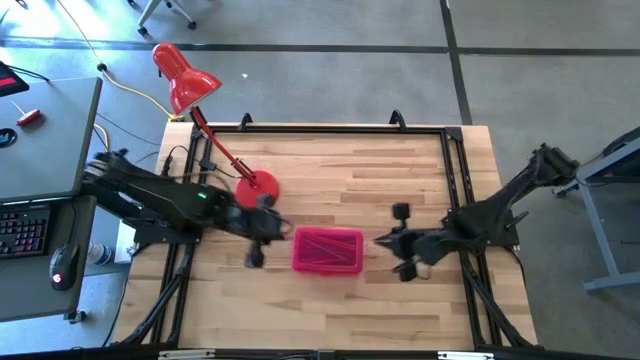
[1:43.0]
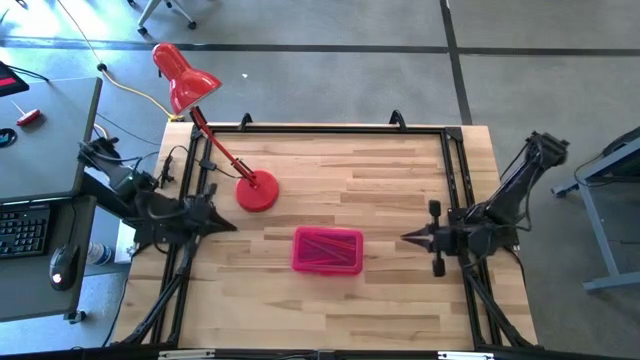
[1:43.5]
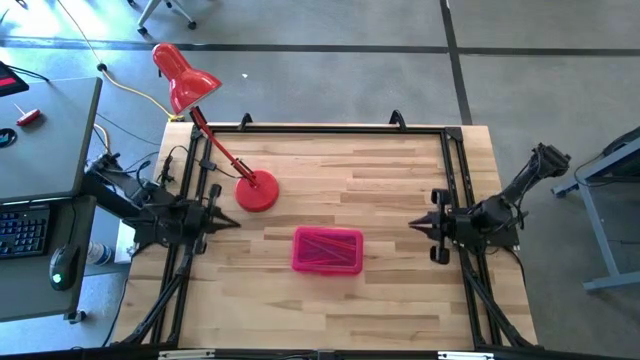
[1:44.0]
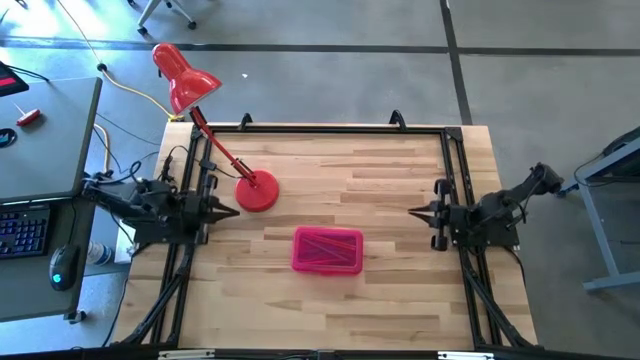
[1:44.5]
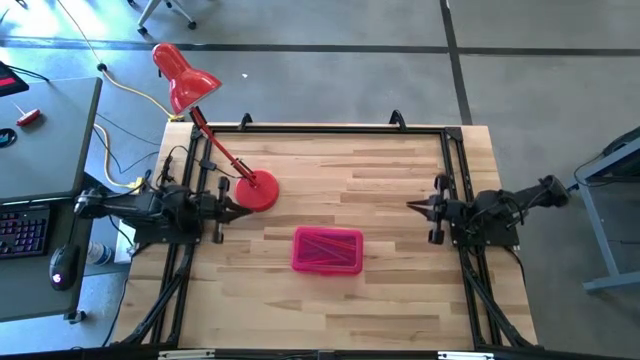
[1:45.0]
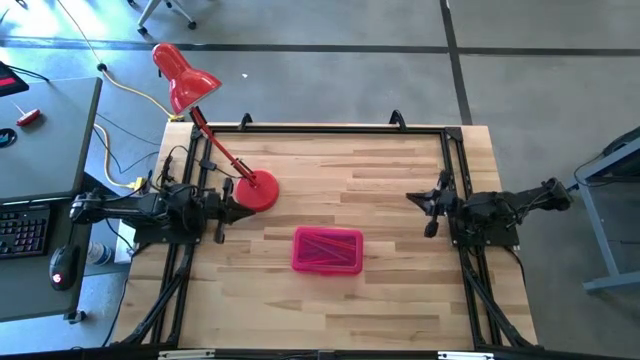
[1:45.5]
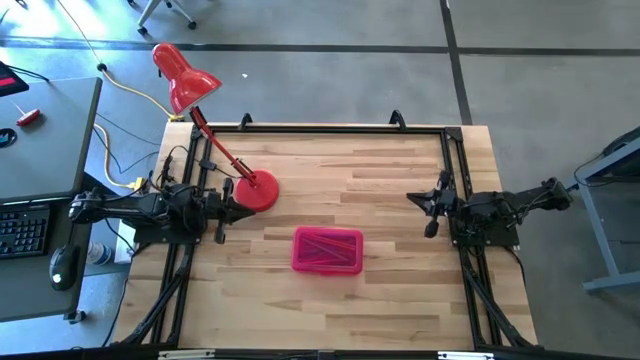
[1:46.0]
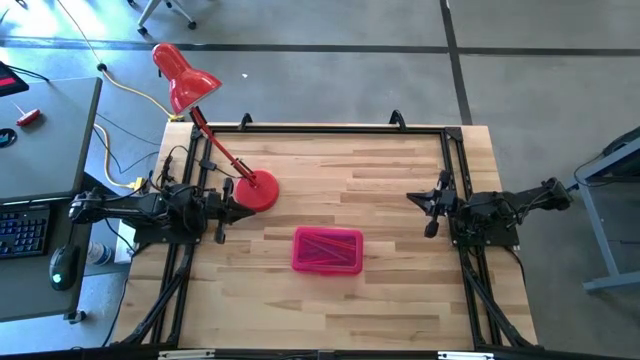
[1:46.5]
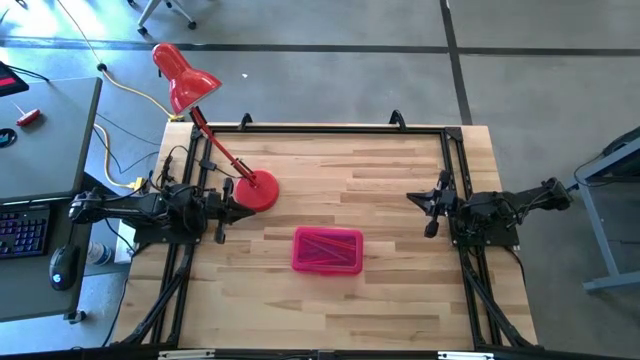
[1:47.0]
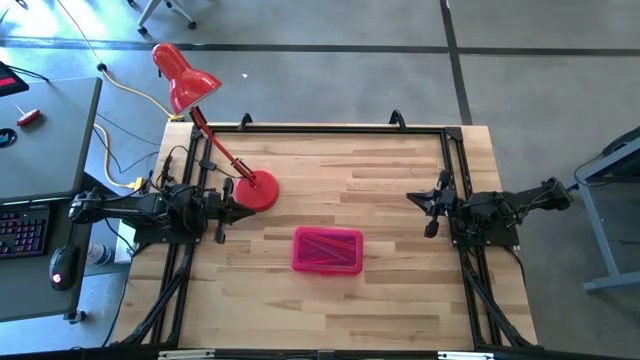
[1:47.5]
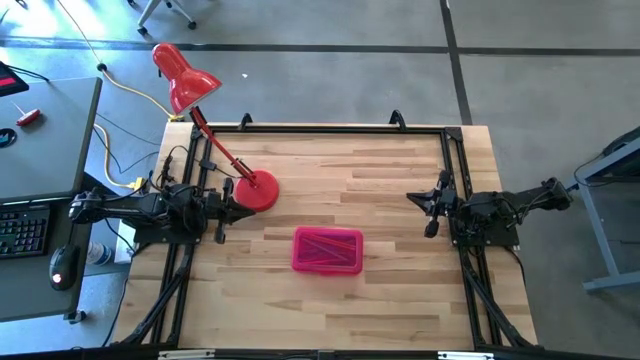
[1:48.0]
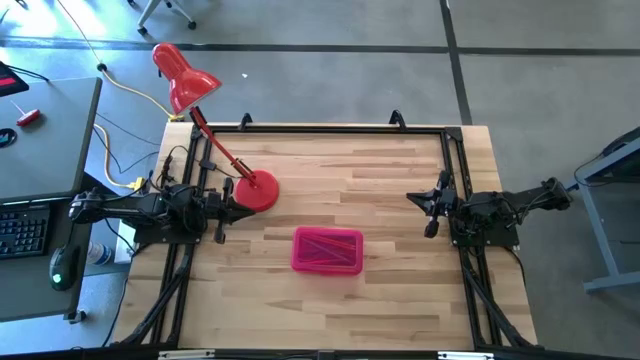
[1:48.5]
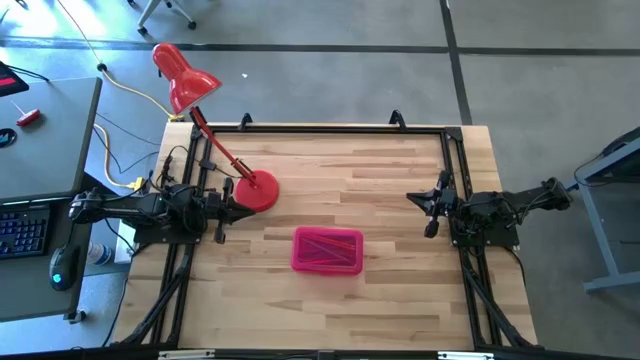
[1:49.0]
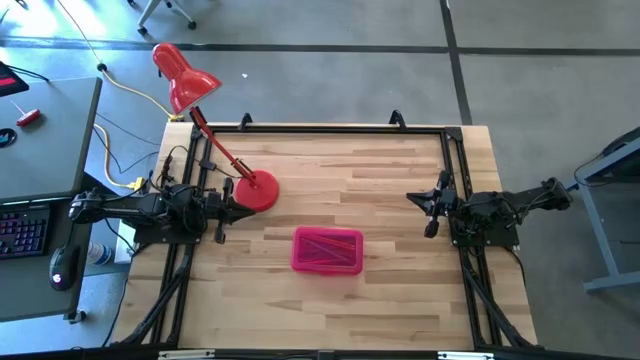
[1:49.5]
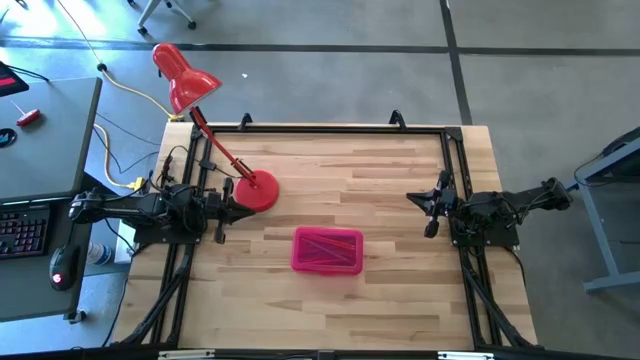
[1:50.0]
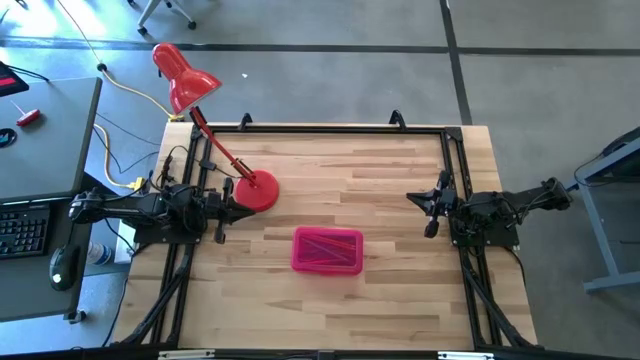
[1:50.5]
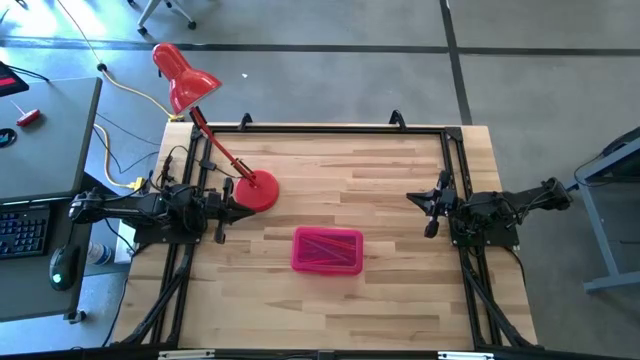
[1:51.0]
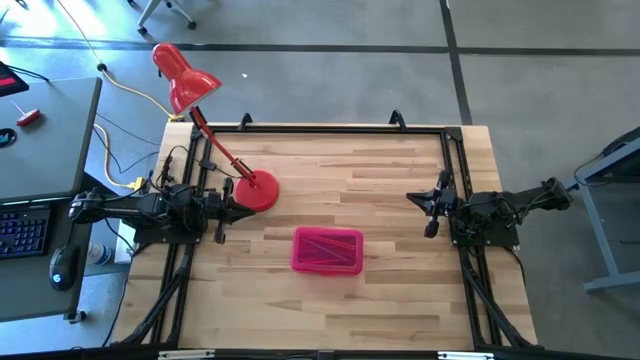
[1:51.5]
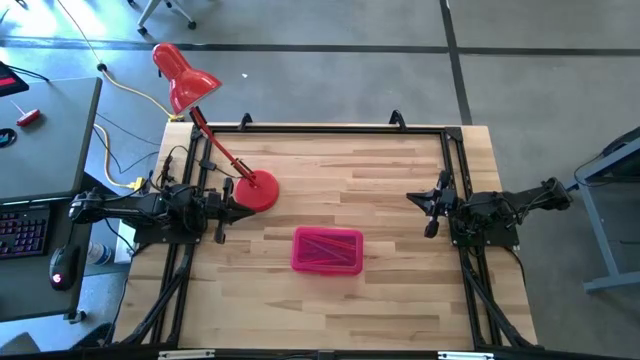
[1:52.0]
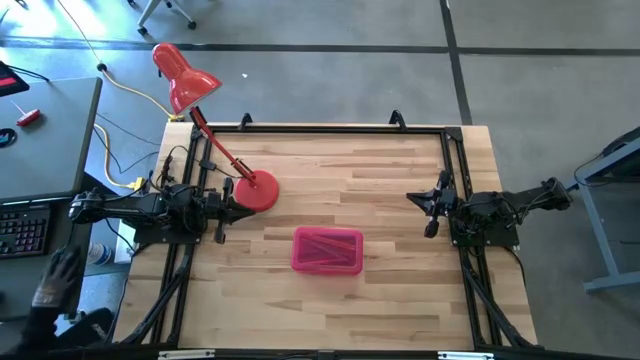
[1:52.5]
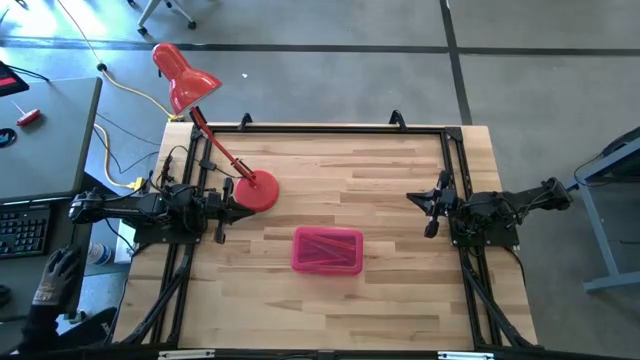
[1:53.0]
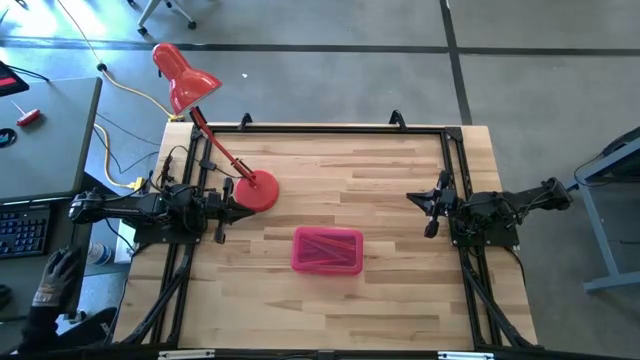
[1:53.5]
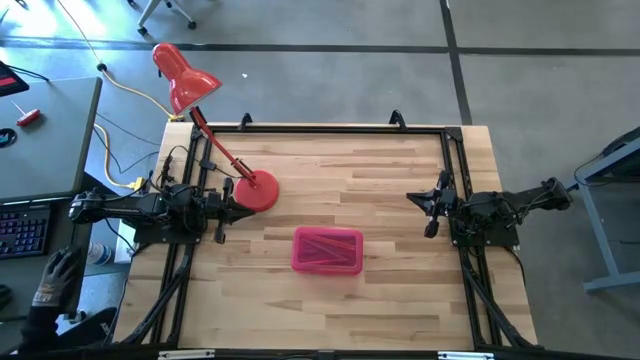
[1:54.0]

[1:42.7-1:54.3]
Task: Pick & place school supplies into a supply box
Return to Home Position

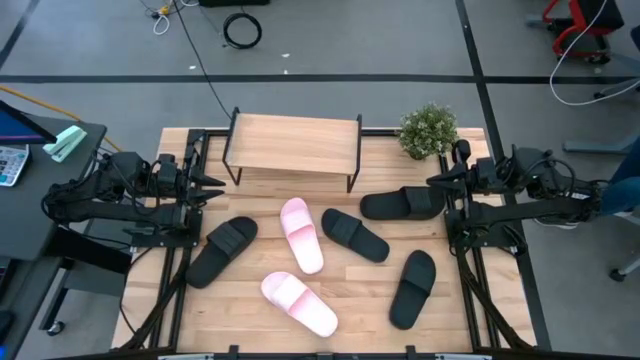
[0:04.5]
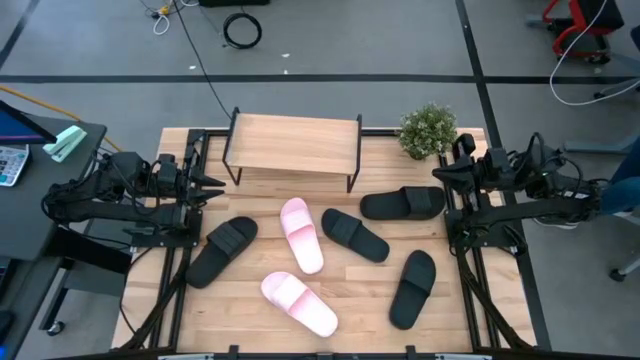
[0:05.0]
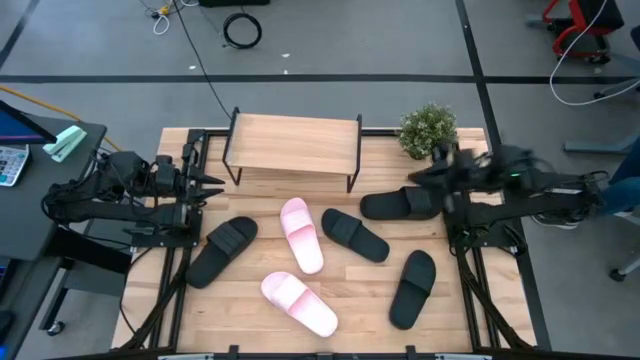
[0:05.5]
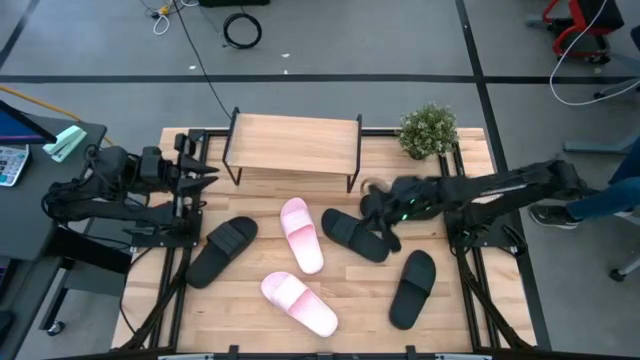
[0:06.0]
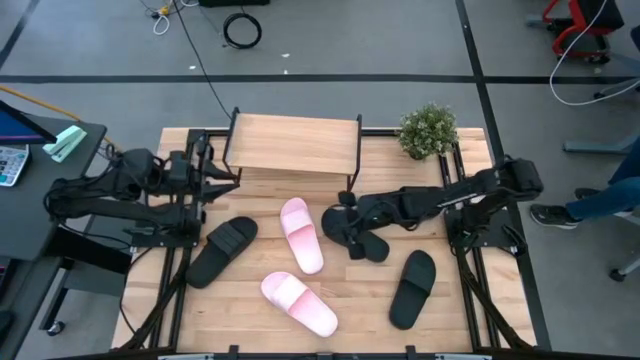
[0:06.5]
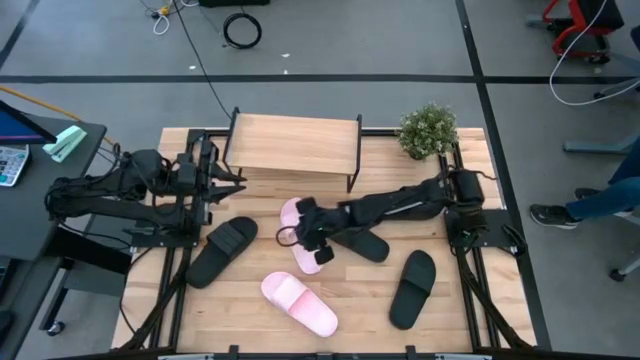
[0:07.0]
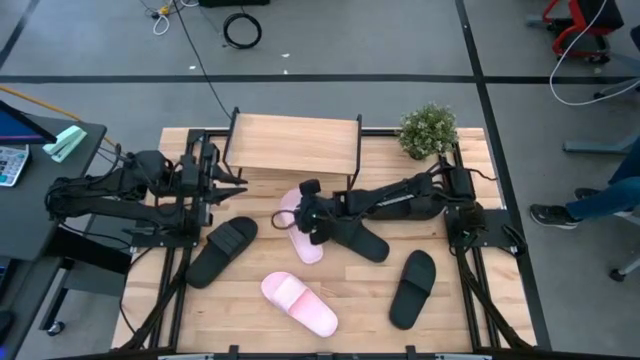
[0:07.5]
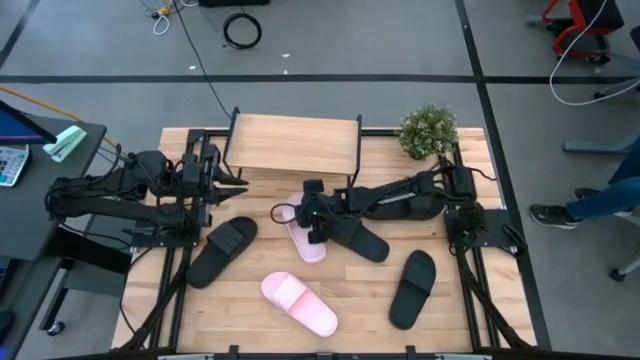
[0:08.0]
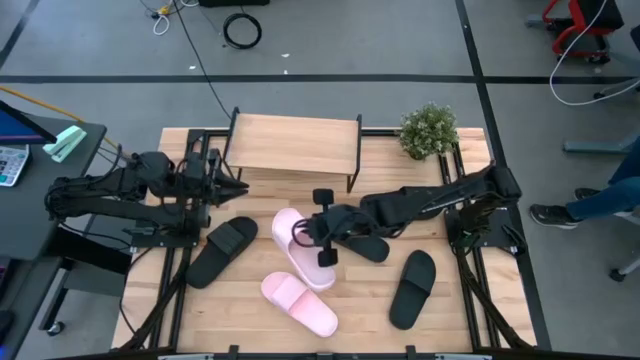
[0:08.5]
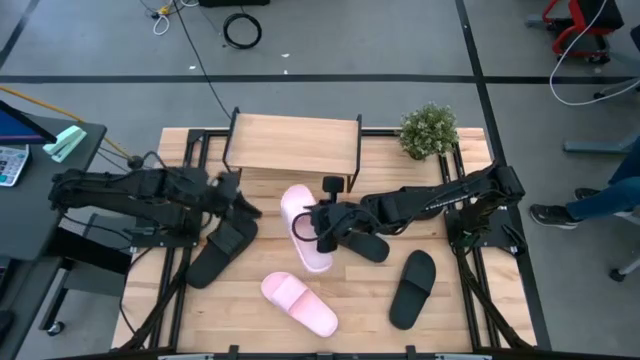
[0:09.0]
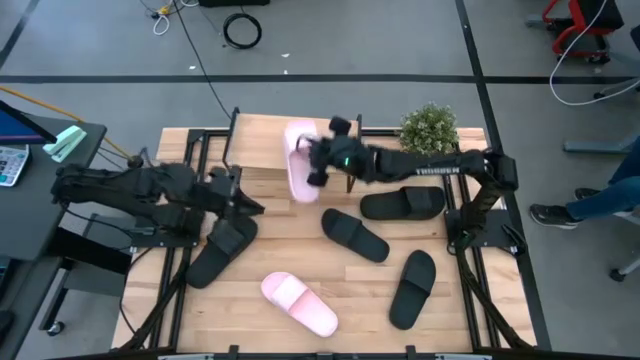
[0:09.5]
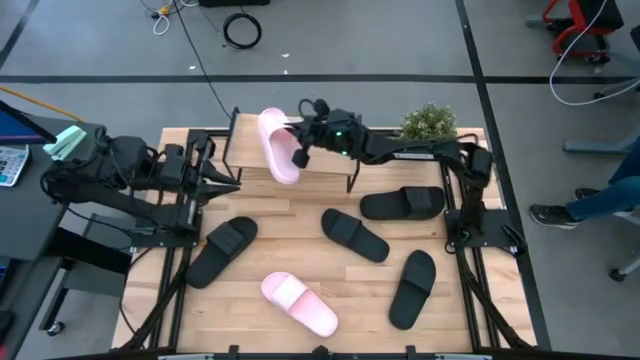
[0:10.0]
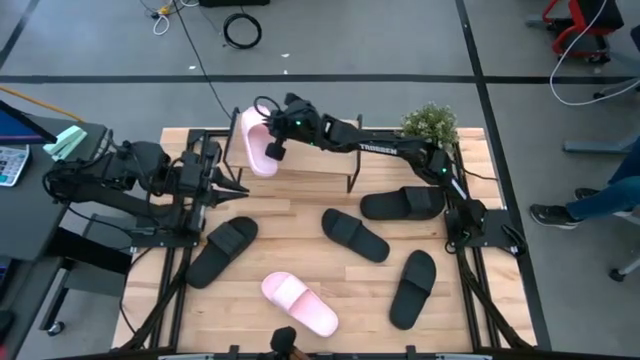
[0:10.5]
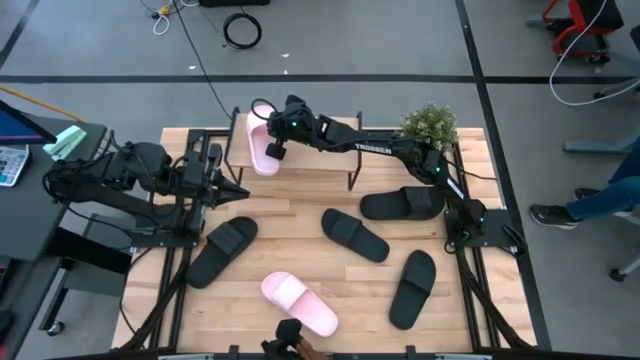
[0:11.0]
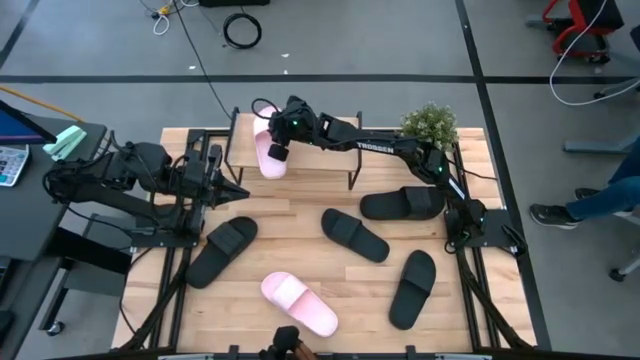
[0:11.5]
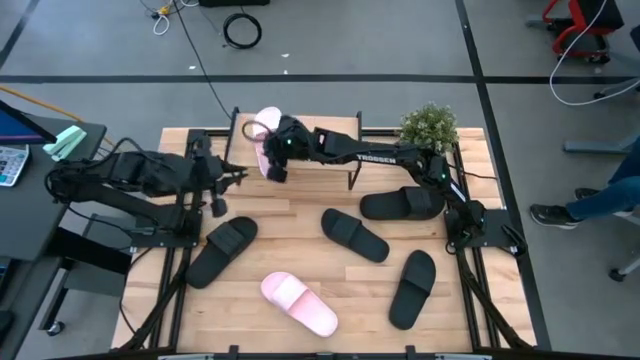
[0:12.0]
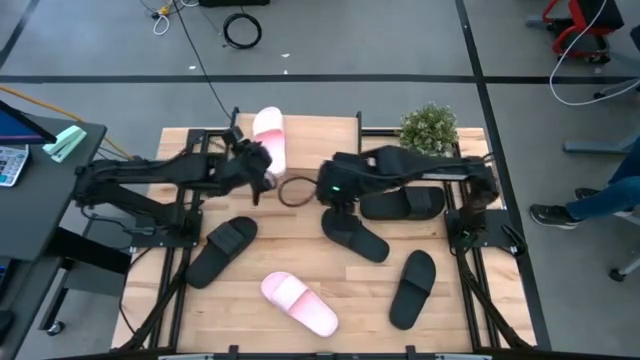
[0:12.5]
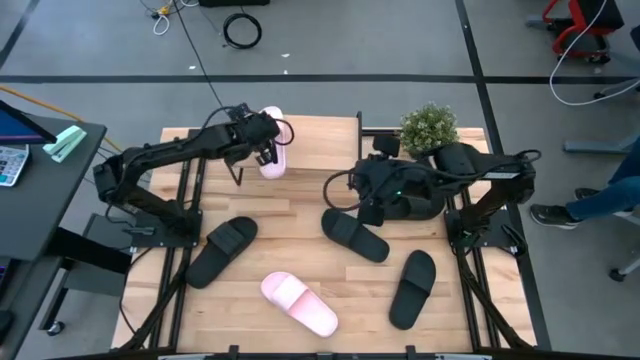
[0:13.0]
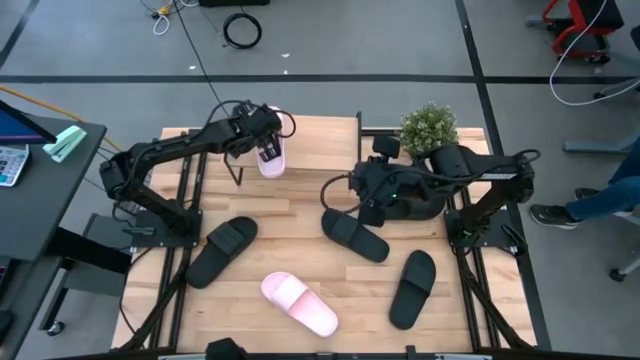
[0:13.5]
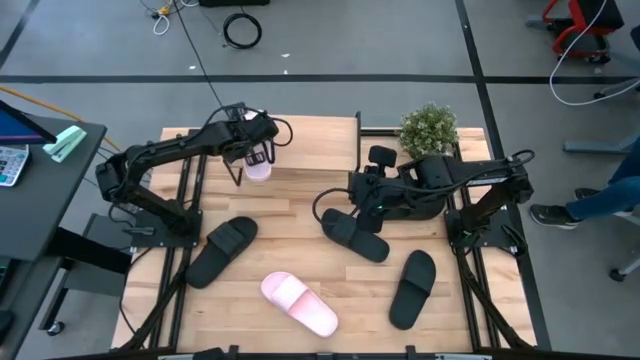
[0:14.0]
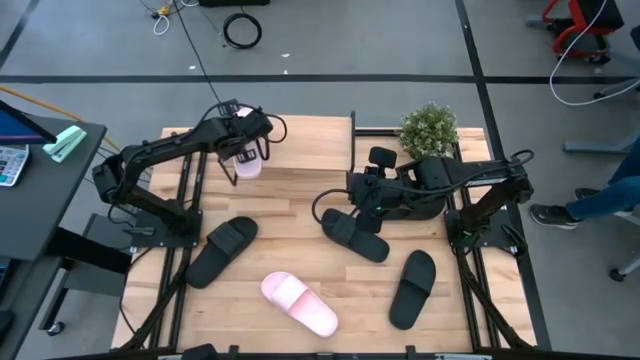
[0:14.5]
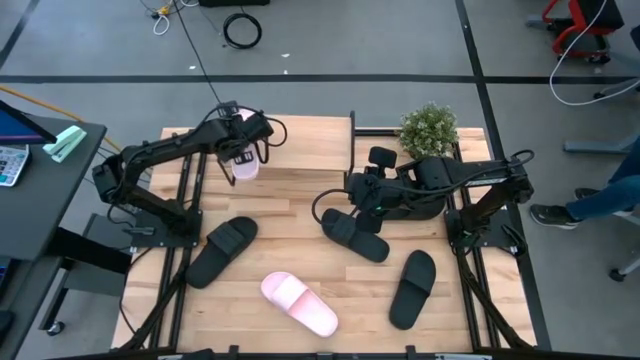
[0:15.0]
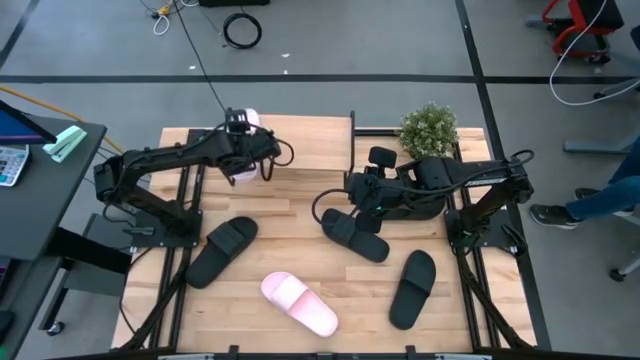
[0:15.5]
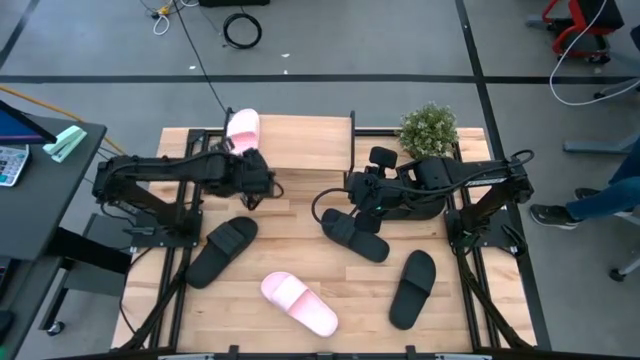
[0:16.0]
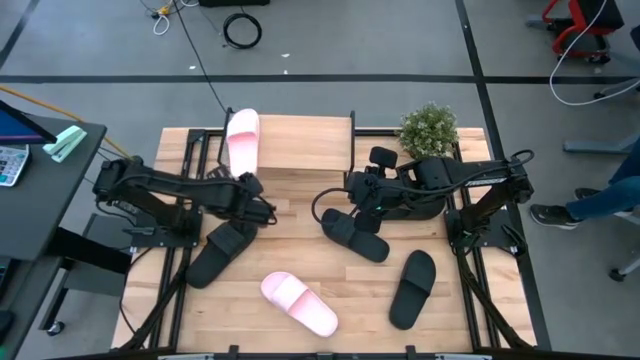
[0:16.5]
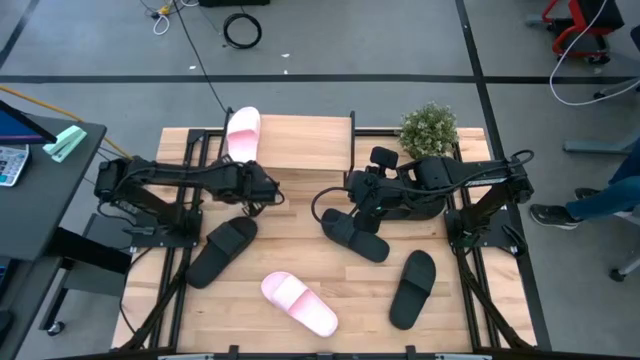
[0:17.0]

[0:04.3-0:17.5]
Task: Pick and place slides into the shelf
Put the pink slide on the shelf
